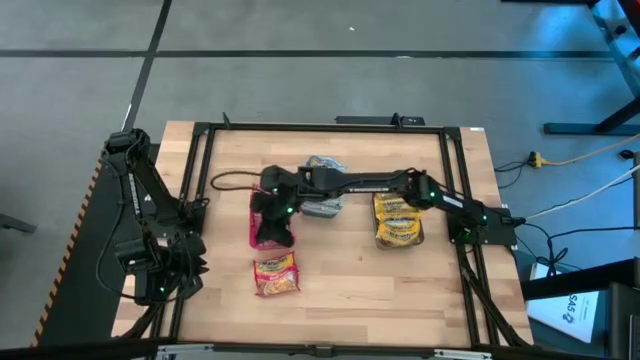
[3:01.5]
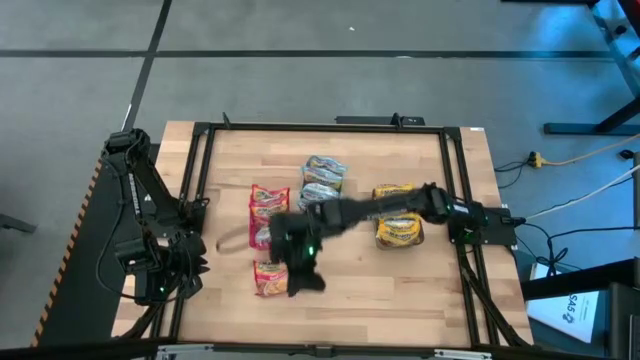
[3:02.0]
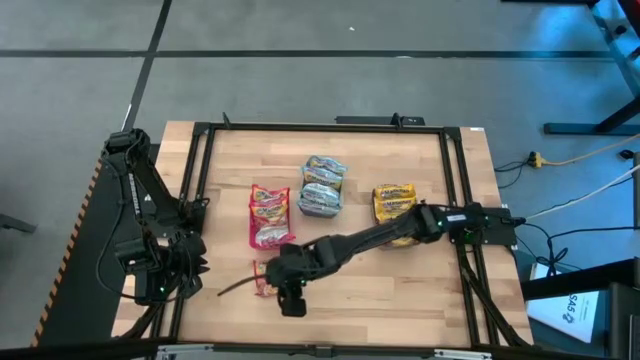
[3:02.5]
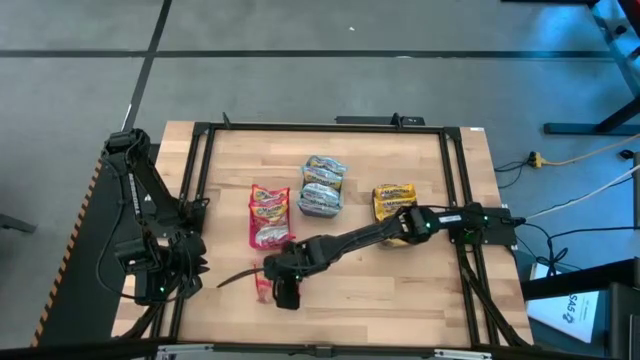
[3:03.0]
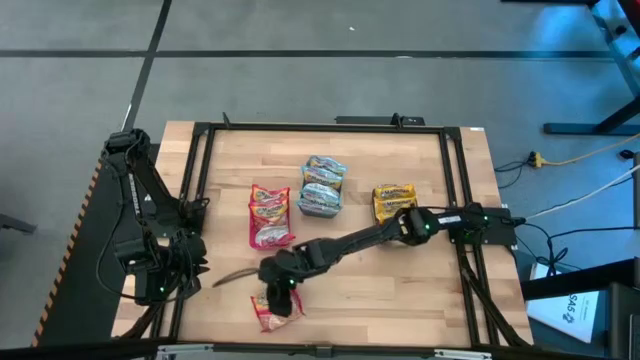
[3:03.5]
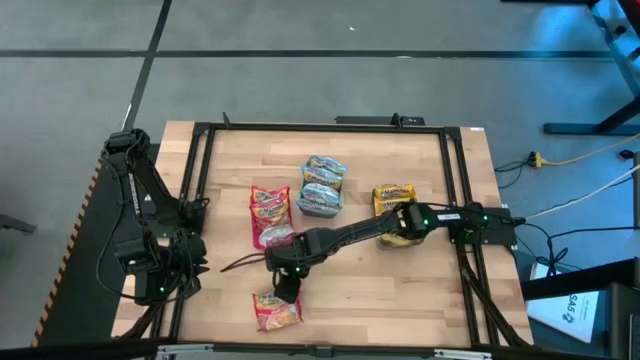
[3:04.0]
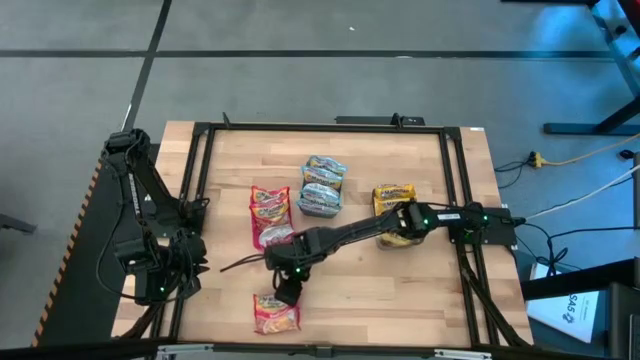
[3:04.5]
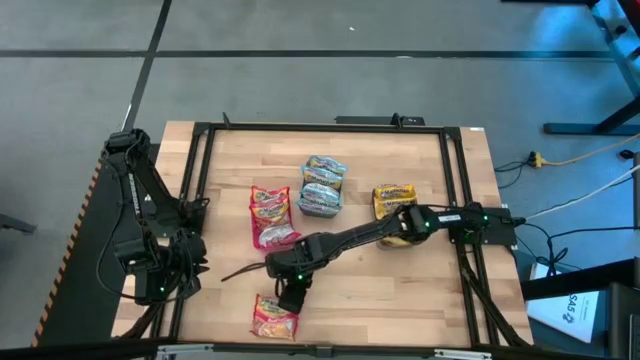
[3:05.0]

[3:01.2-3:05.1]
Task: Sort Maruchan noodles
Put the red noodle pack into the red bin

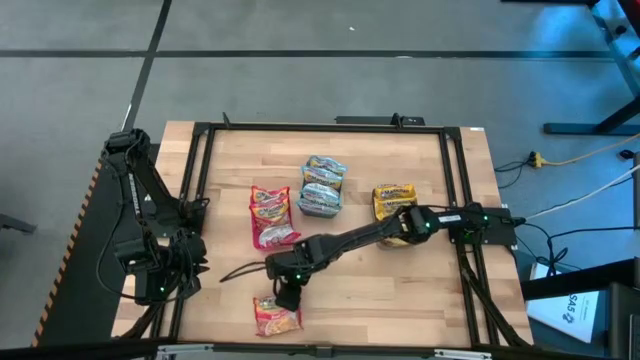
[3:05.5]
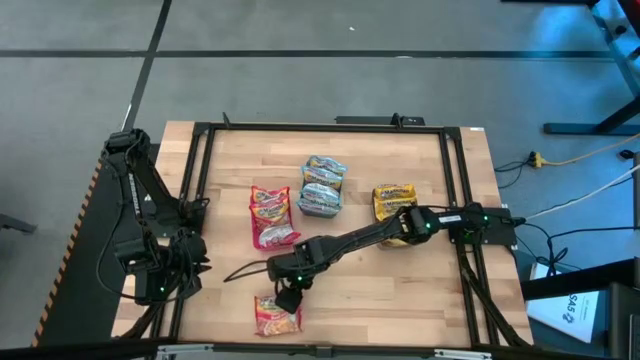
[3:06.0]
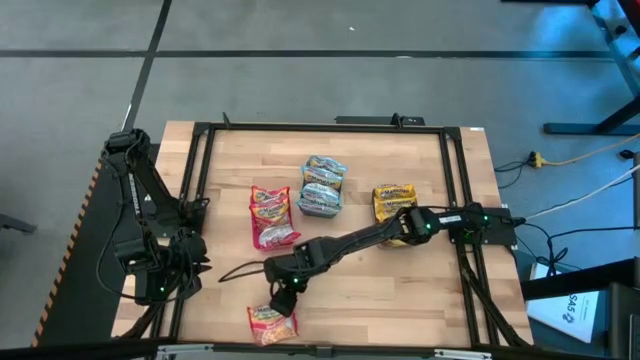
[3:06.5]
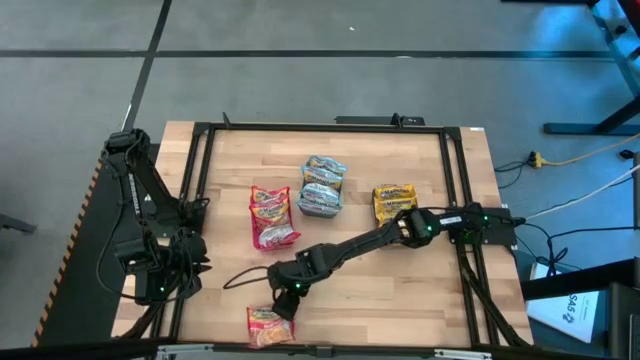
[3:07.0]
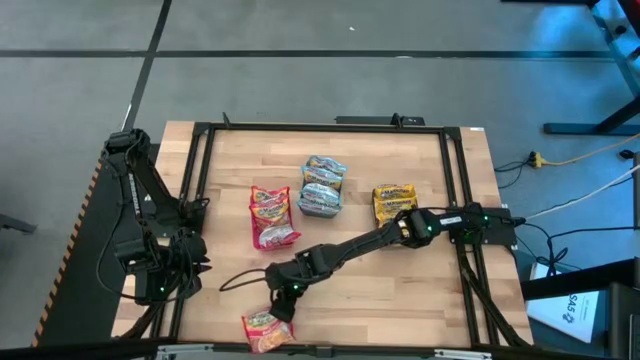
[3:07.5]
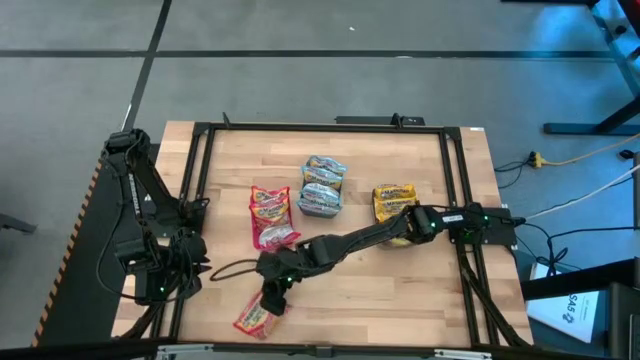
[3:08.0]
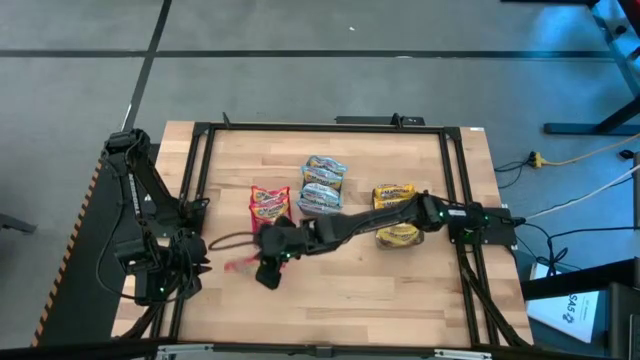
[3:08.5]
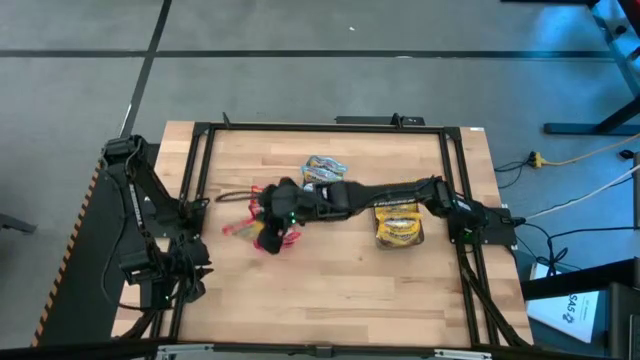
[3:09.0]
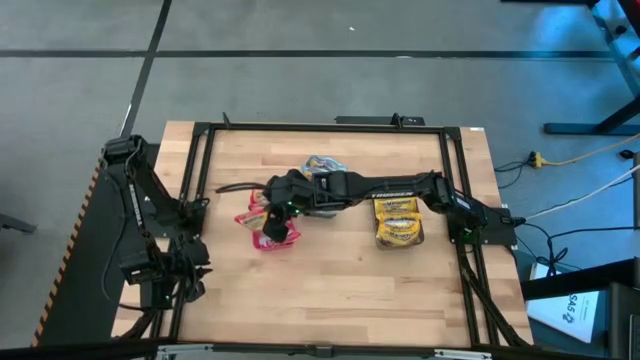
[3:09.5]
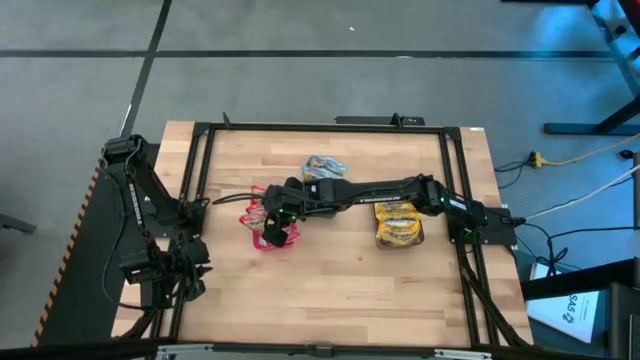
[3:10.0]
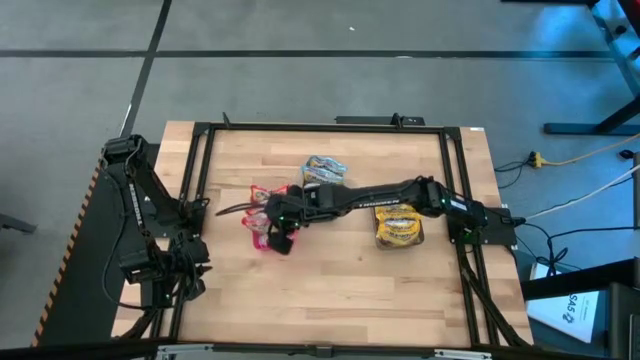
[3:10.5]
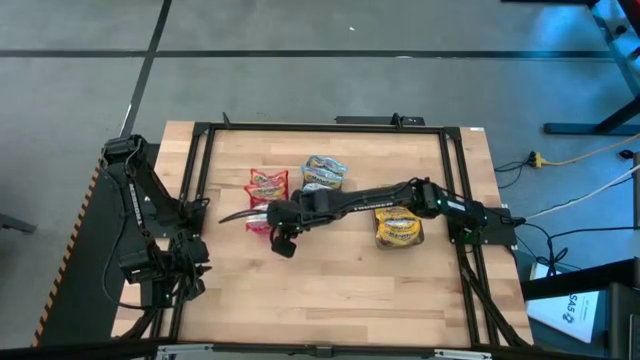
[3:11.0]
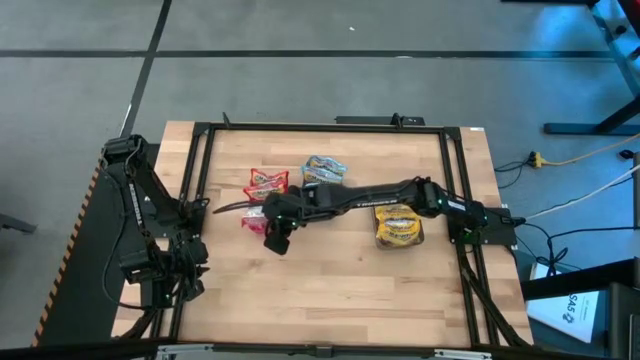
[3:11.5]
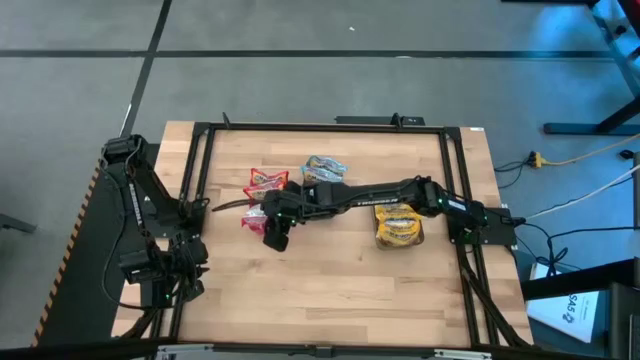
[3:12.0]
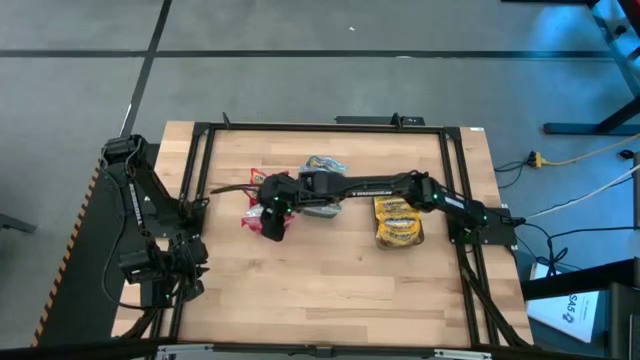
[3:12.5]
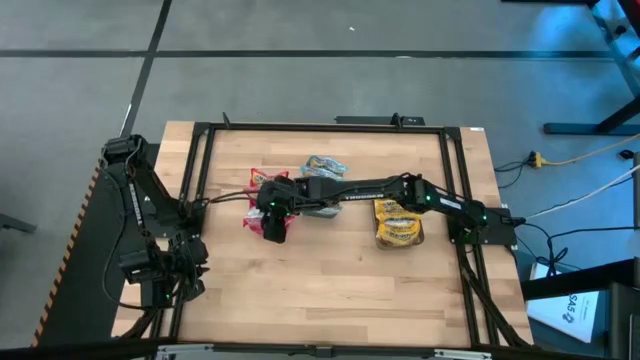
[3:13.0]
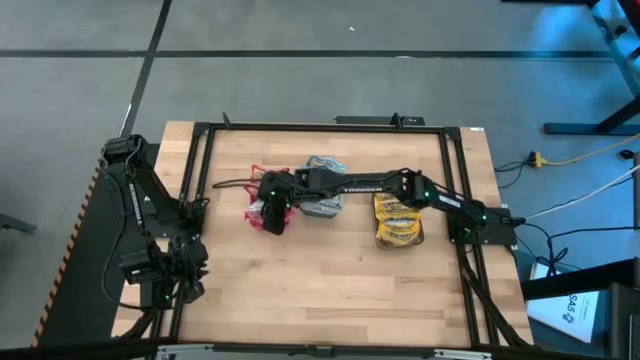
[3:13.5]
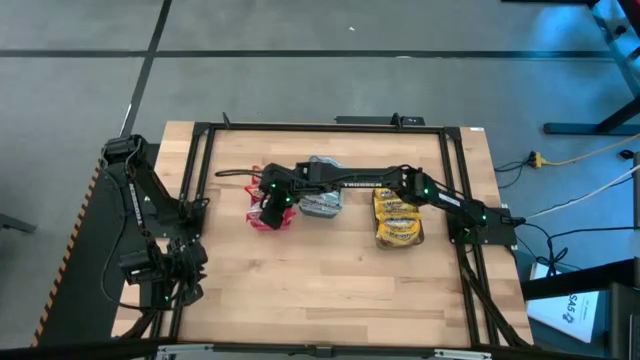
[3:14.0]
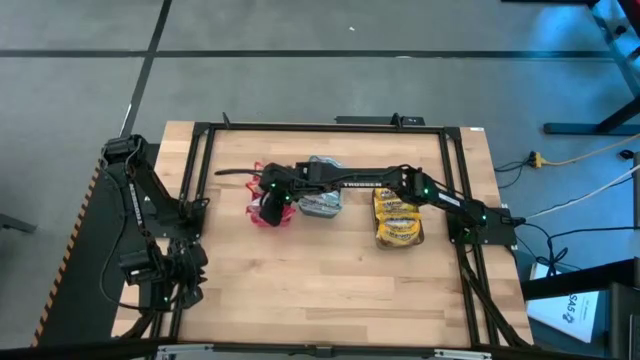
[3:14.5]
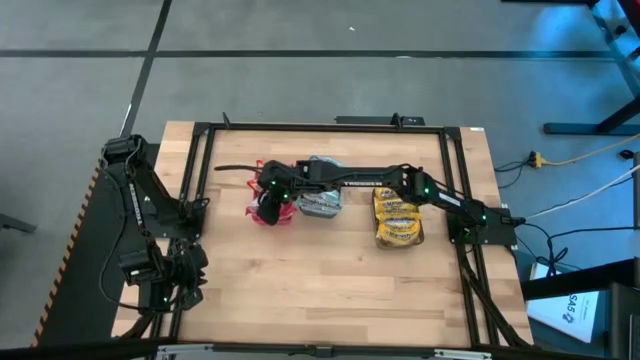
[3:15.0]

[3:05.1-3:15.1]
Put the red noodle pack into the red bin

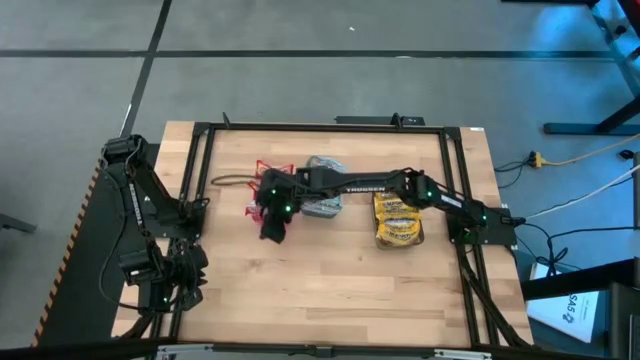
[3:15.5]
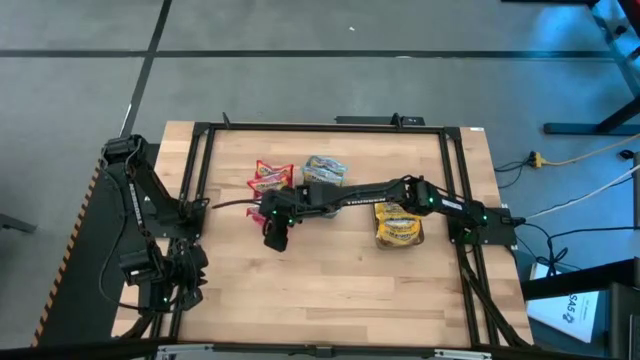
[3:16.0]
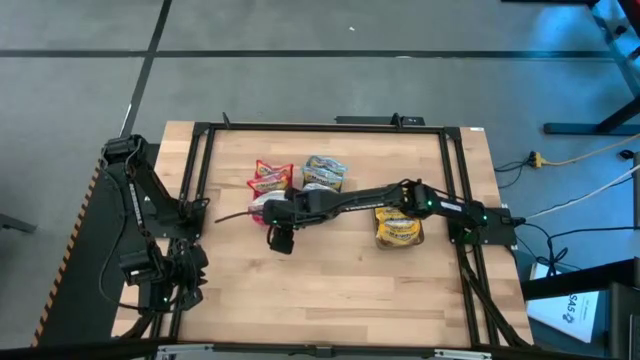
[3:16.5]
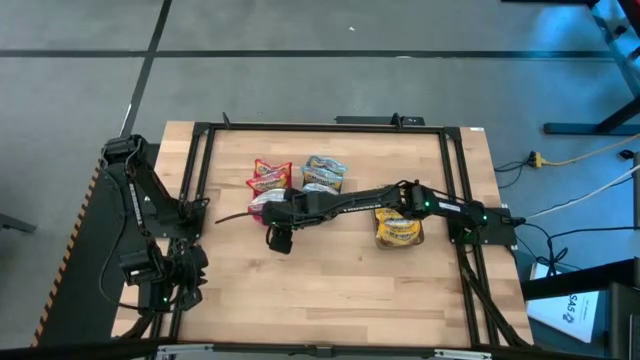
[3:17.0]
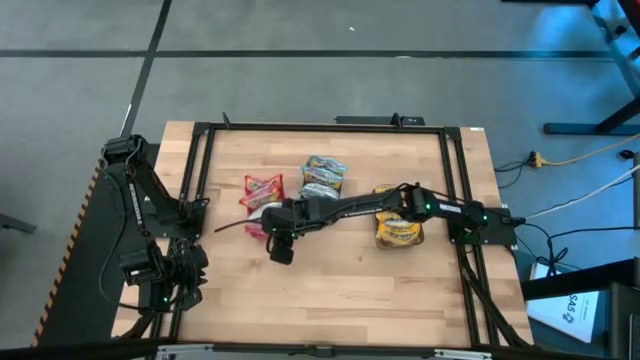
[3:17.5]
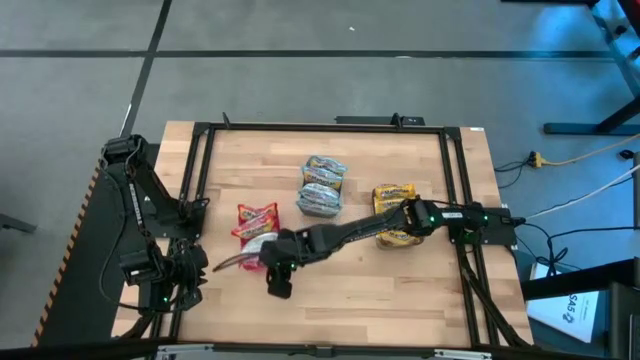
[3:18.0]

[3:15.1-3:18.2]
Move the red bin to the middle left of the table
